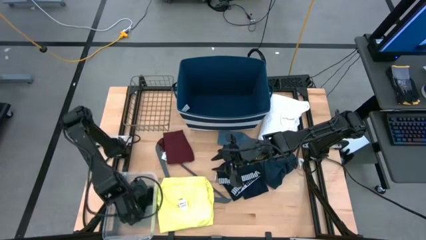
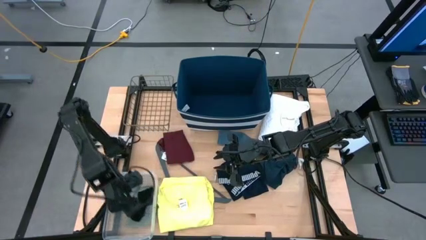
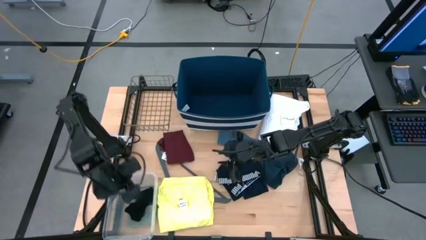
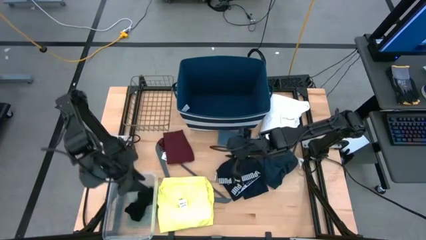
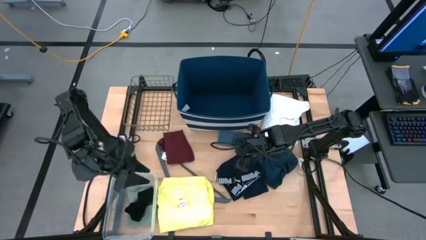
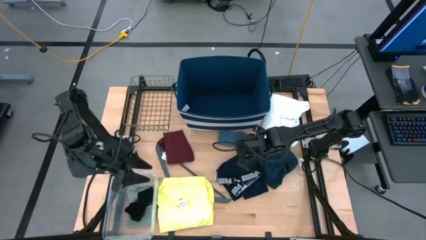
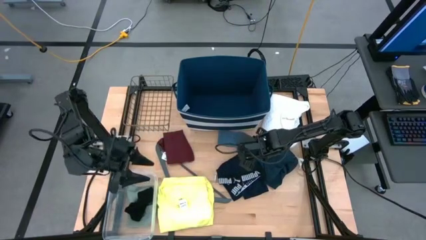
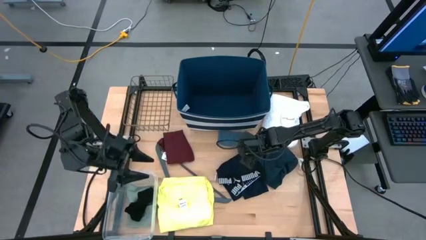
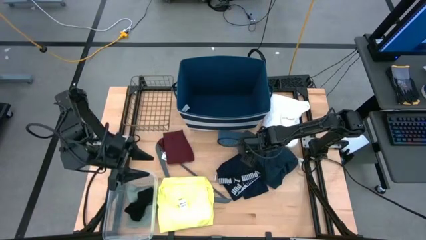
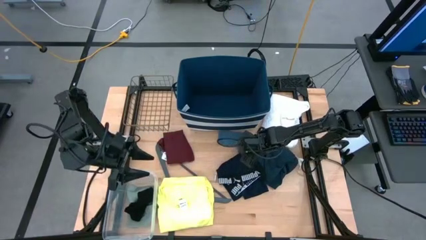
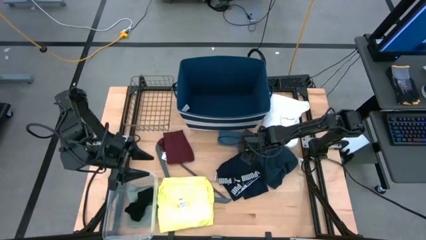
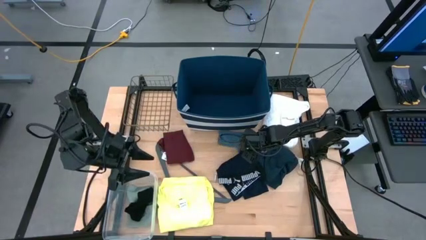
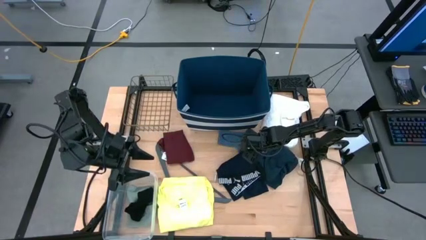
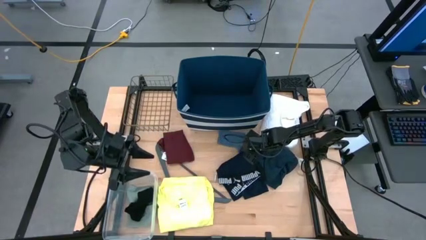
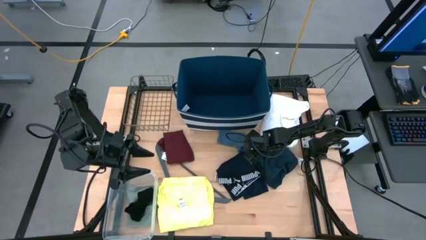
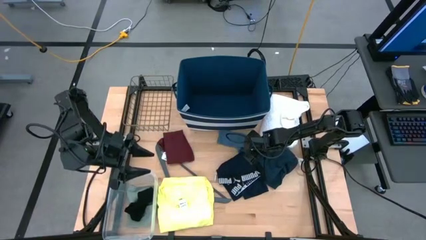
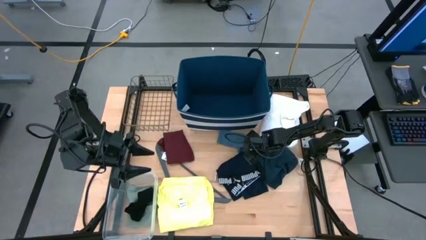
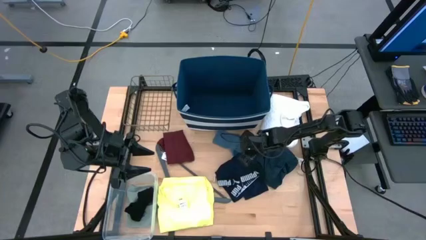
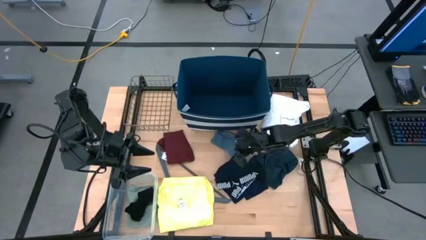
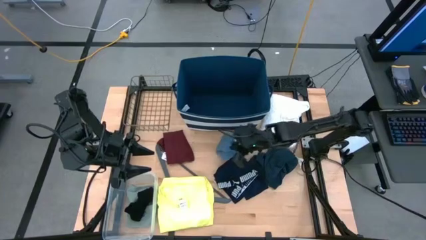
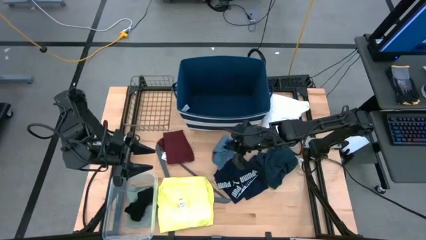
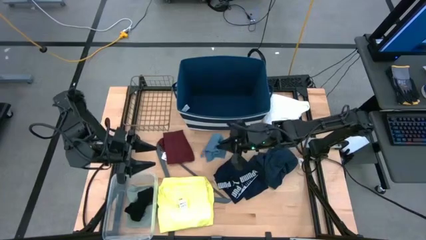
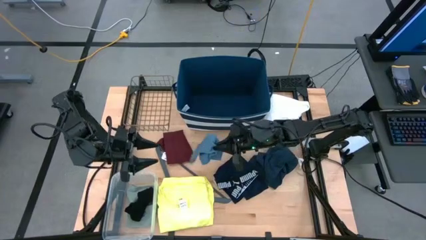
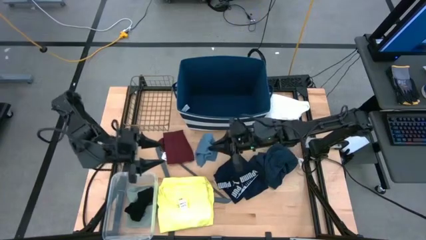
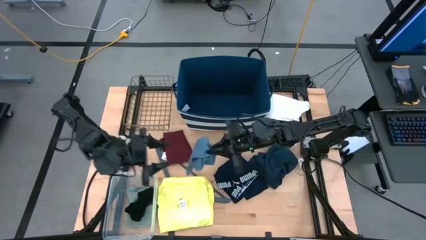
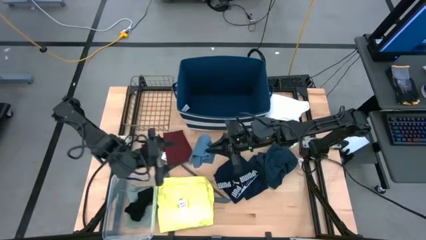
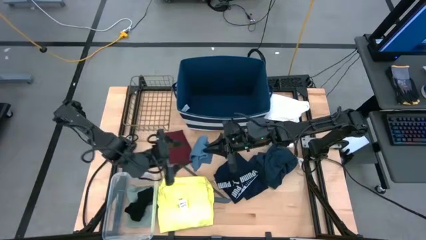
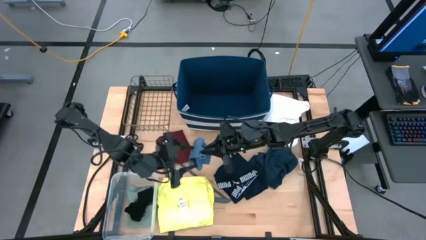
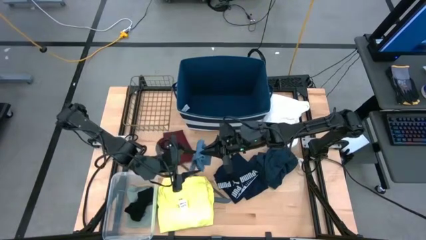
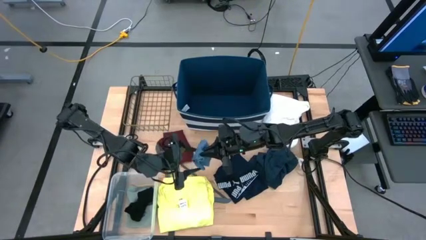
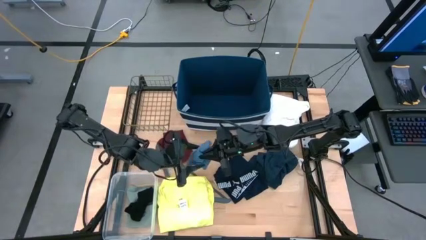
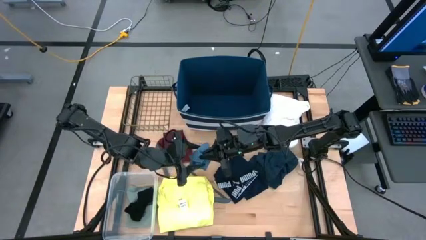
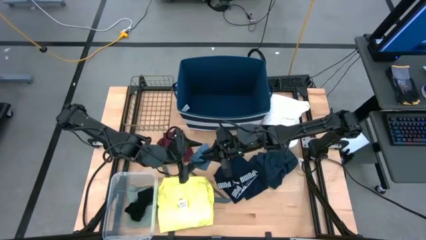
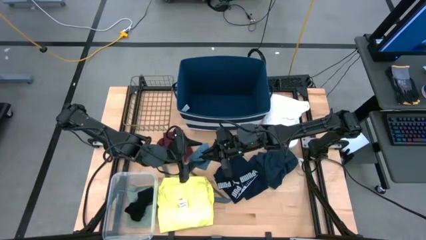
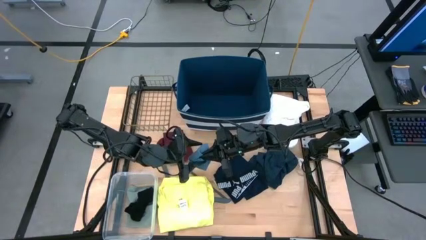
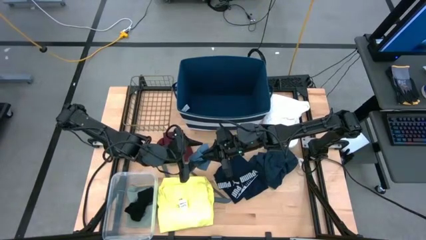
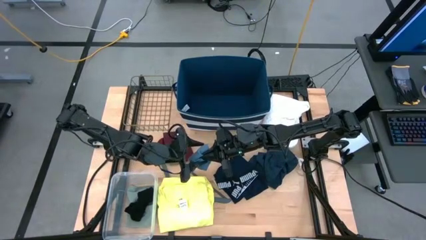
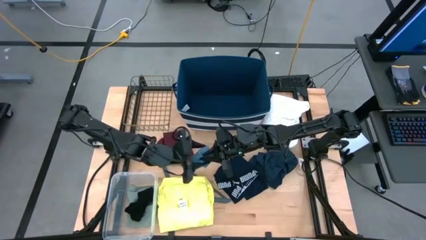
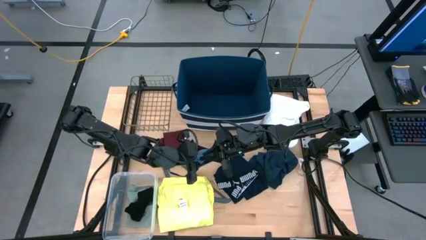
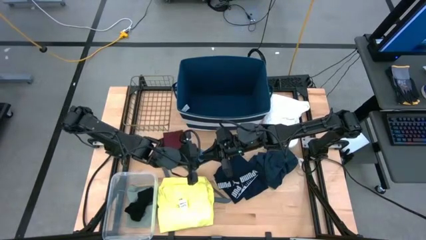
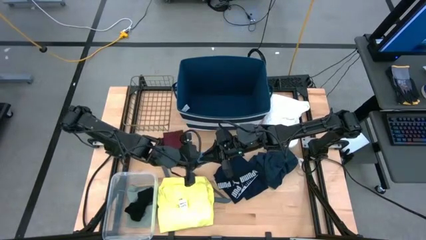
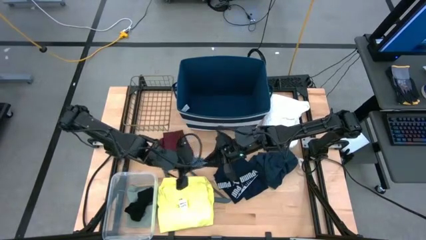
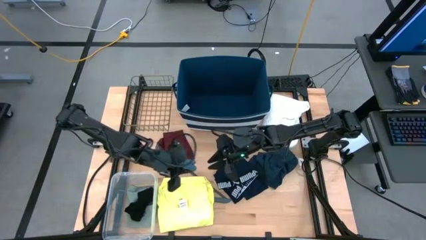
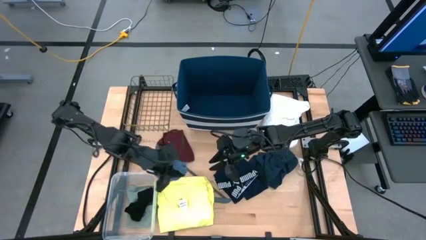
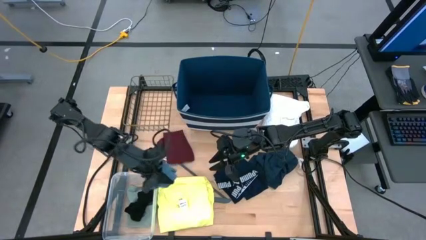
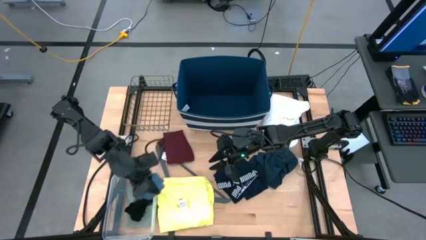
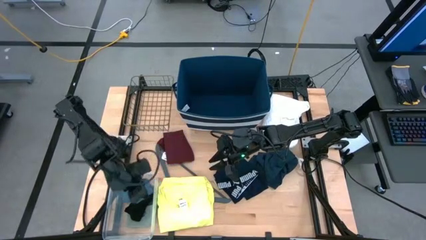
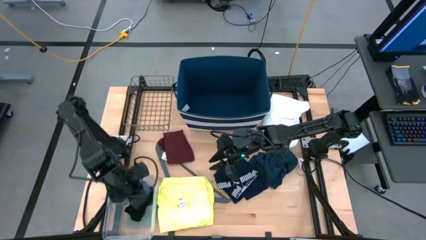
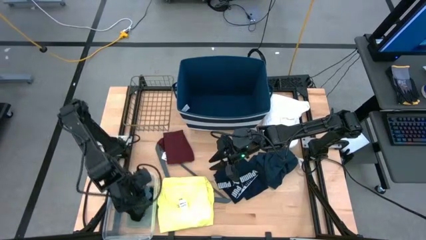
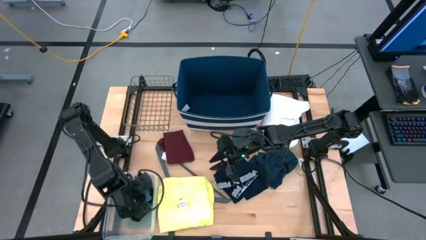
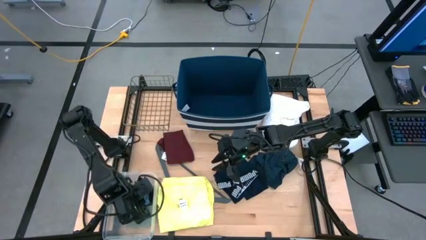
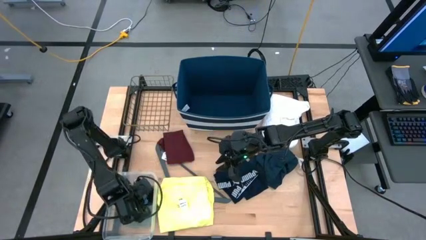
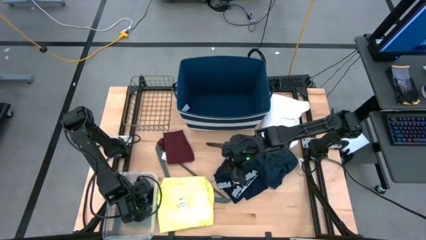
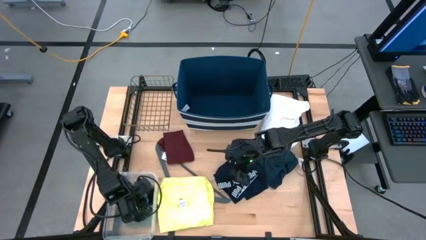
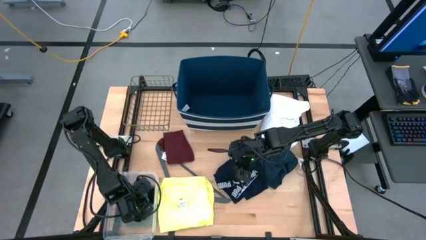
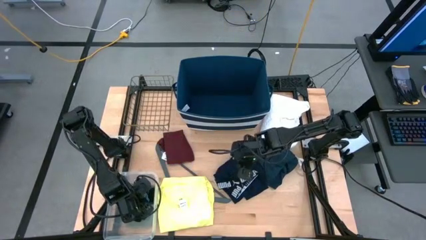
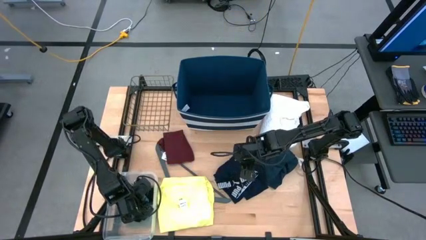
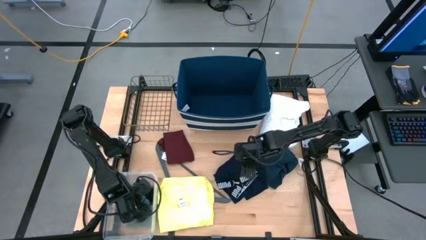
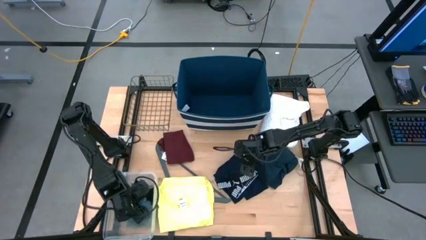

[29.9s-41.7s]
Task: Pick & Place Cloths
Put the light blue sock into the transparent bin

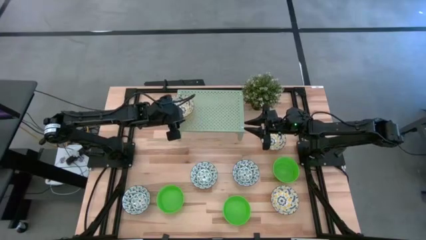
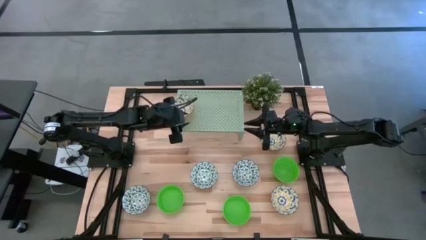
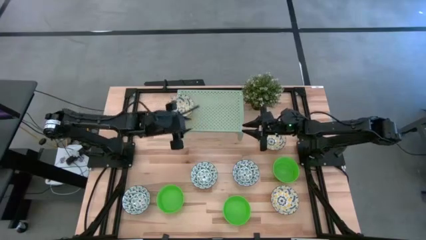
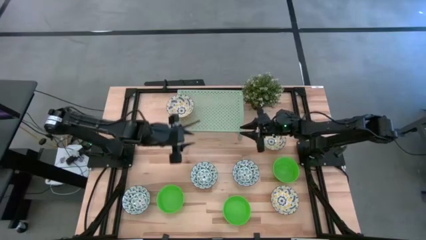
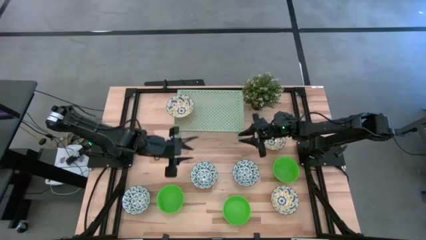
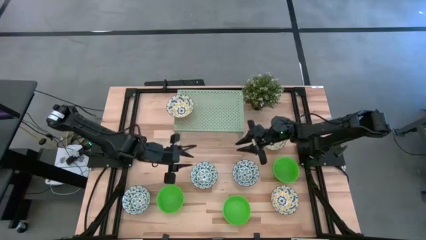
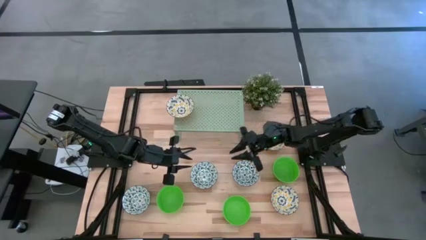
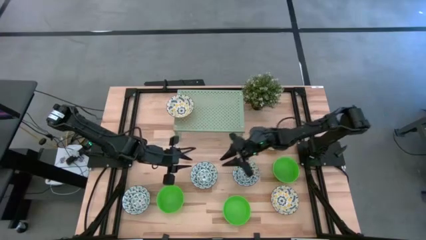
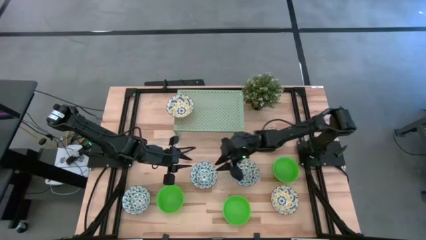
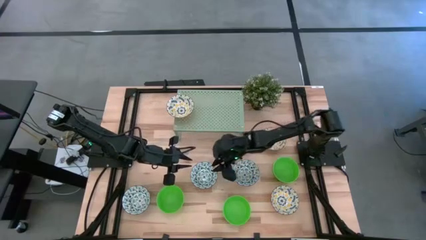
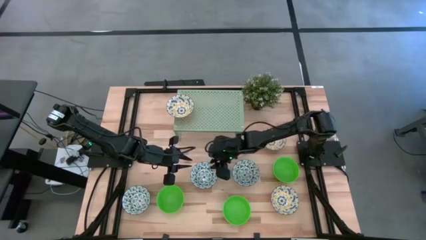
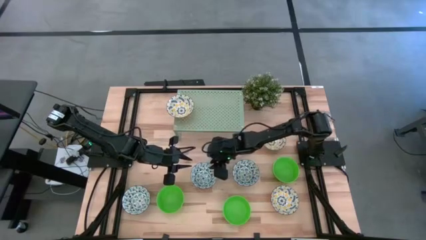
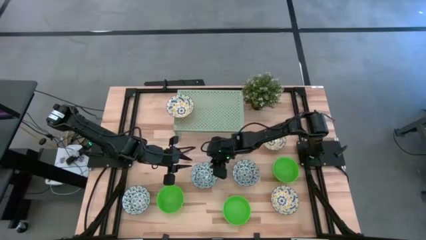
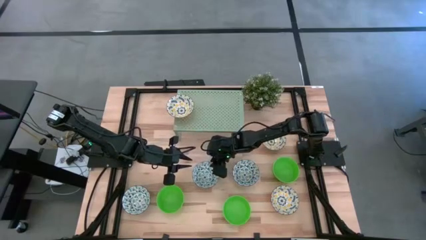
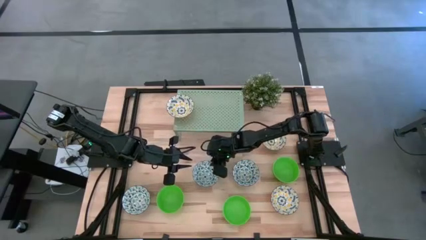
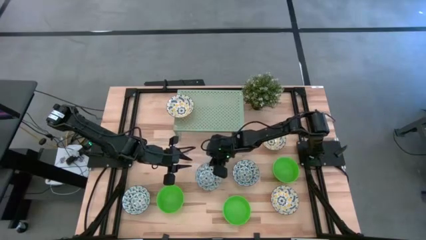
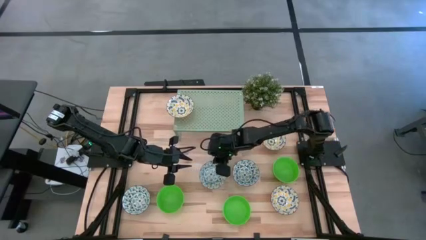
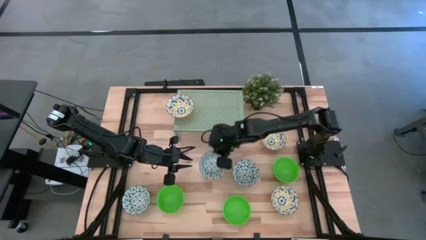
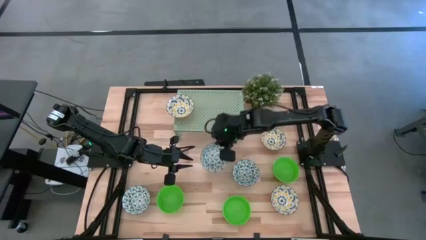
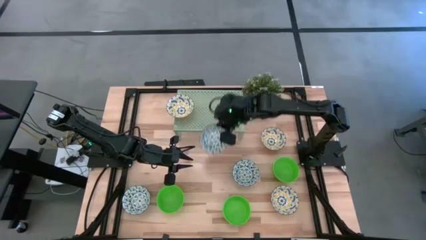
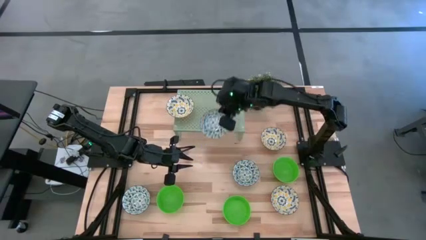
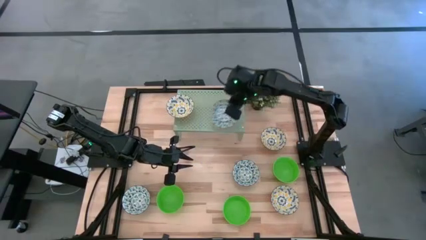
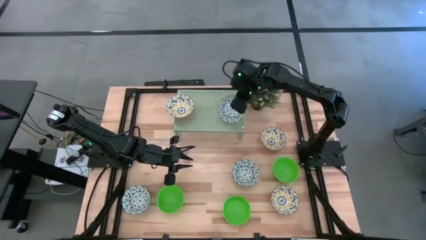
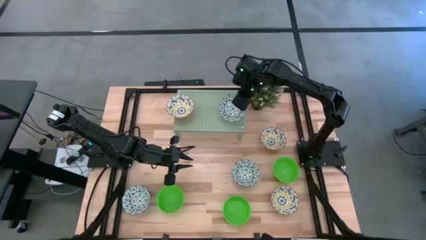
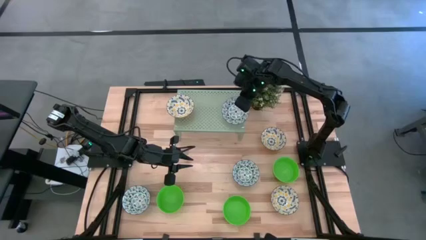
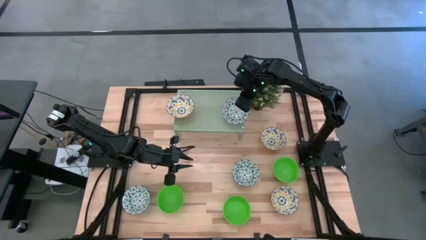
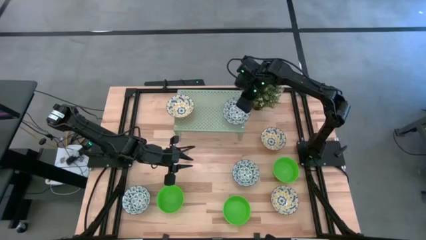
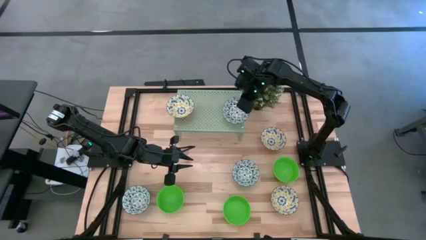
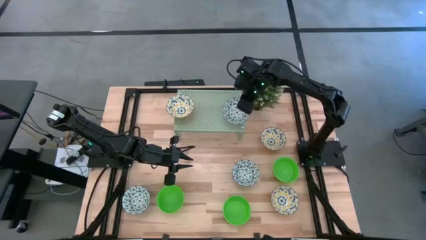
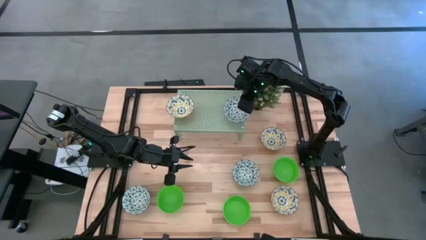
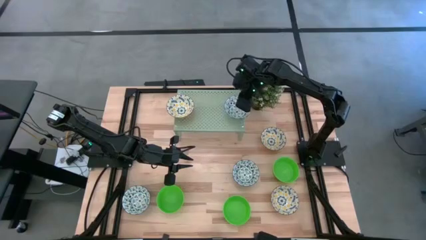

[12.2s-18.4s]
Task: Pick & Place Mini bowls
Put the middle blue and white bowl on the shelf
